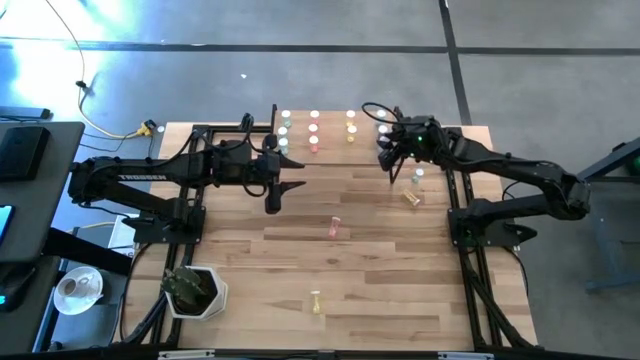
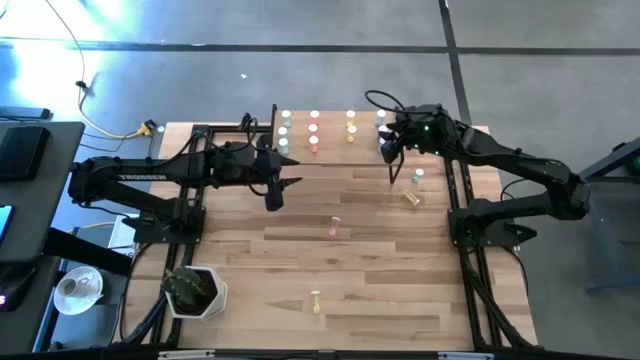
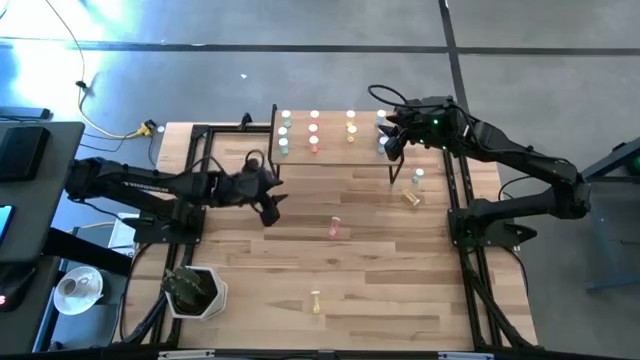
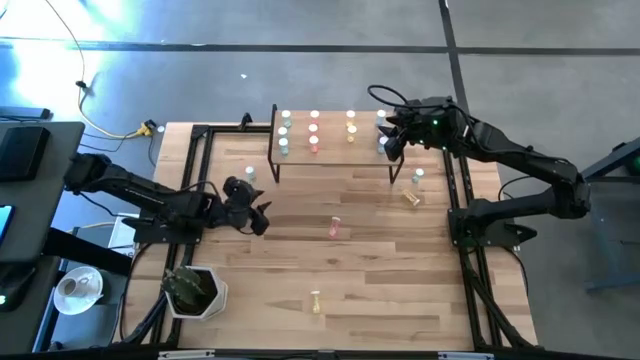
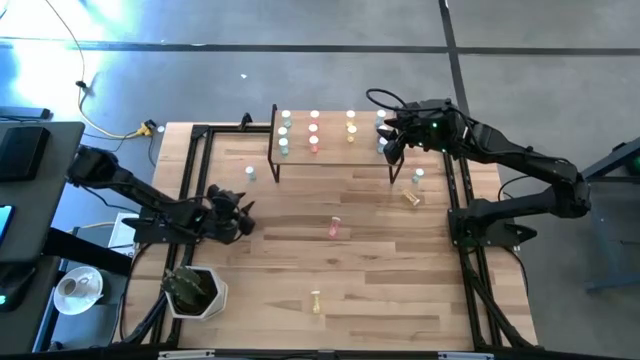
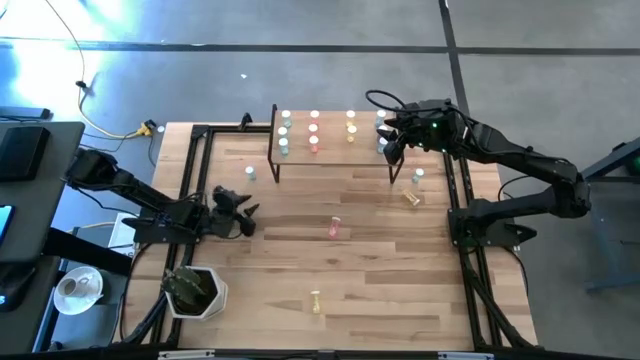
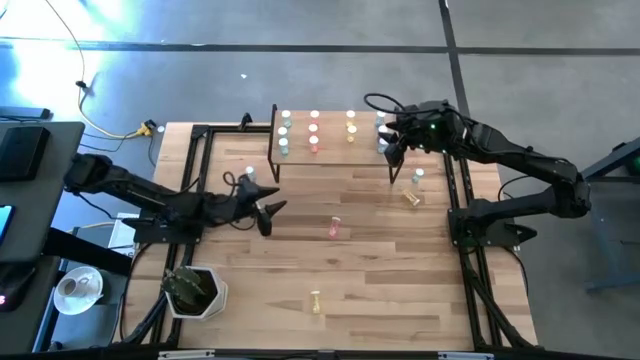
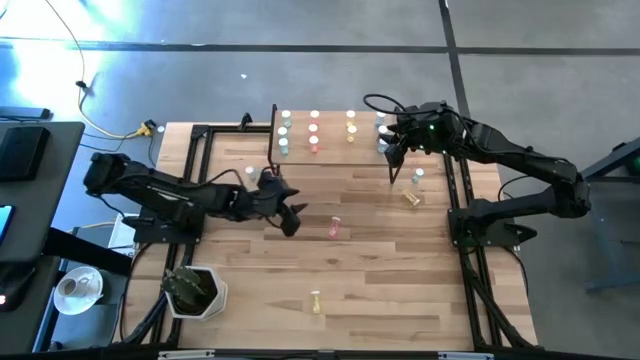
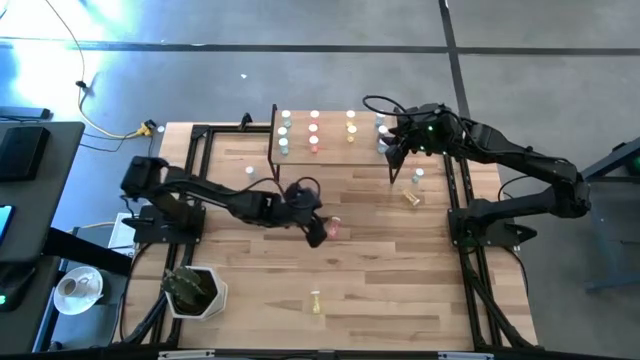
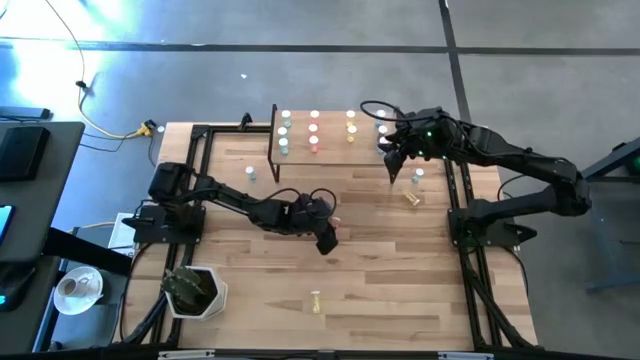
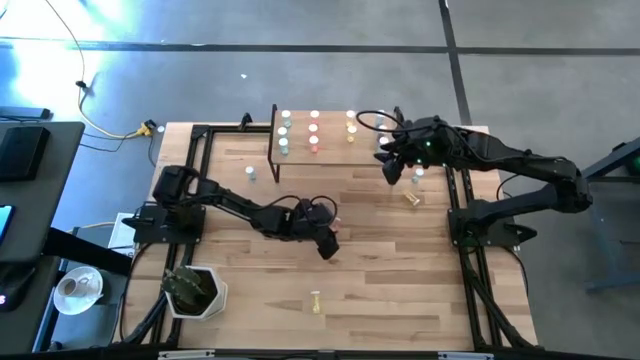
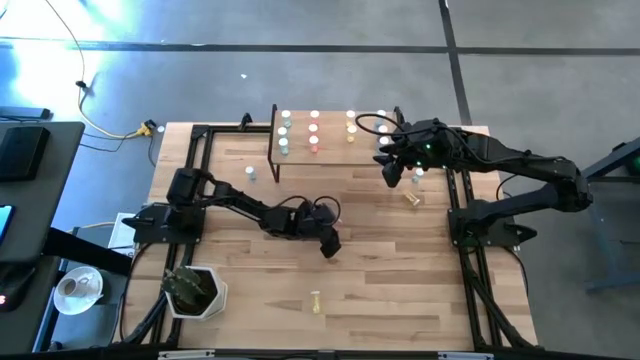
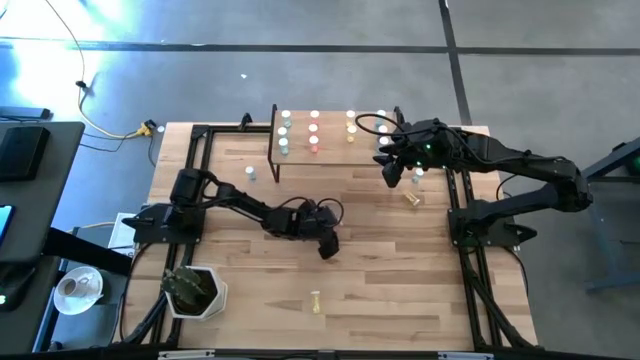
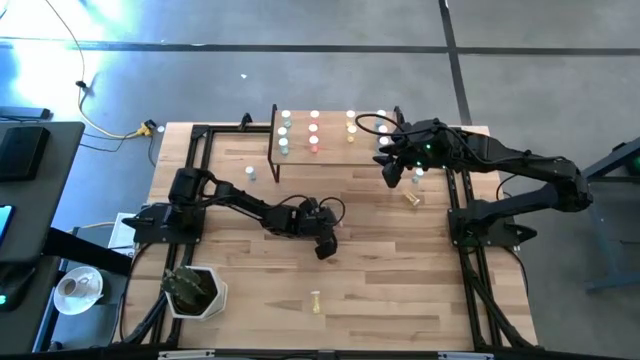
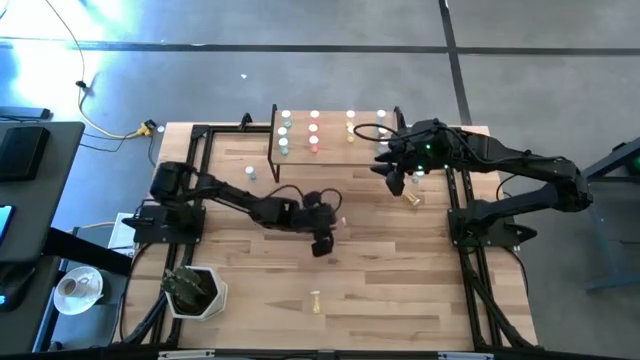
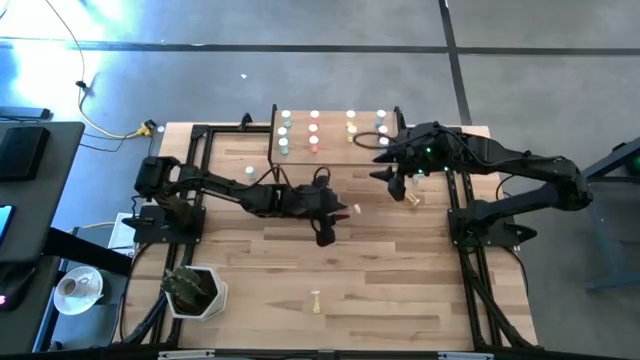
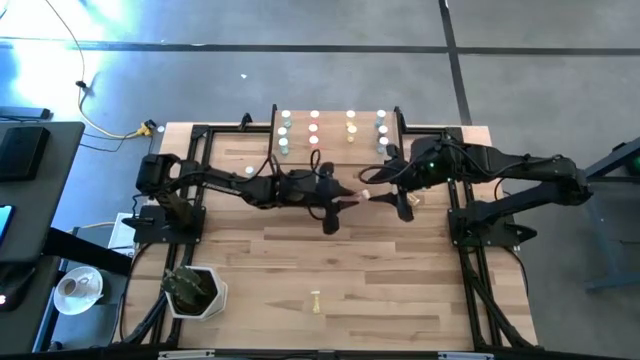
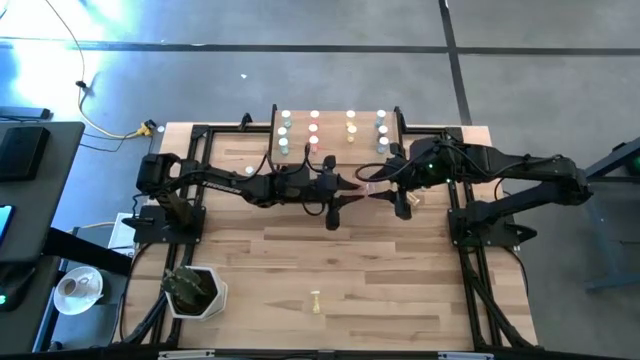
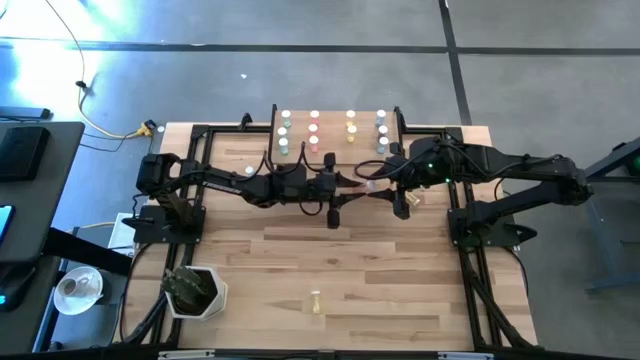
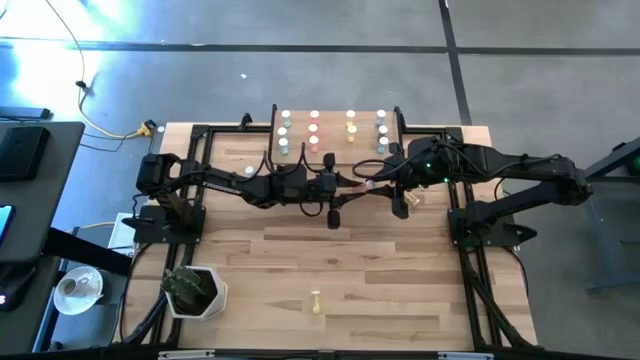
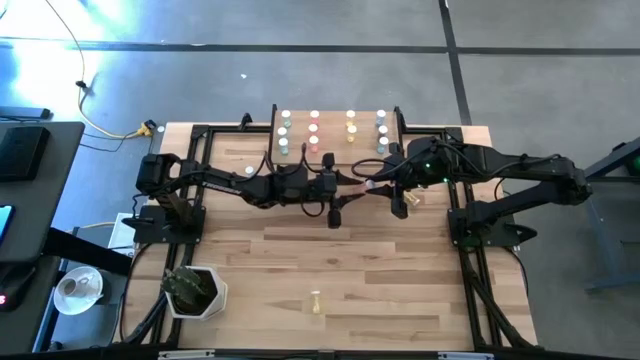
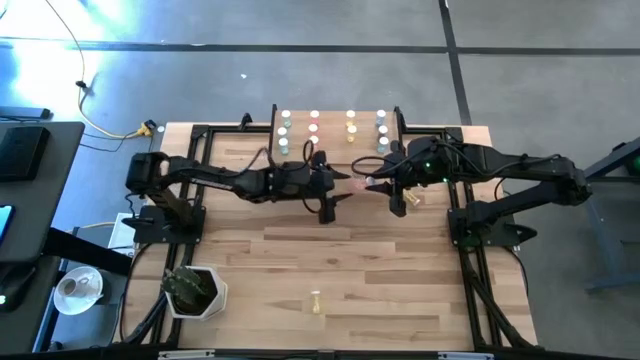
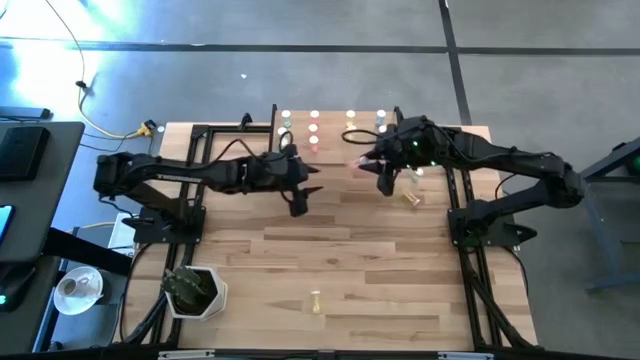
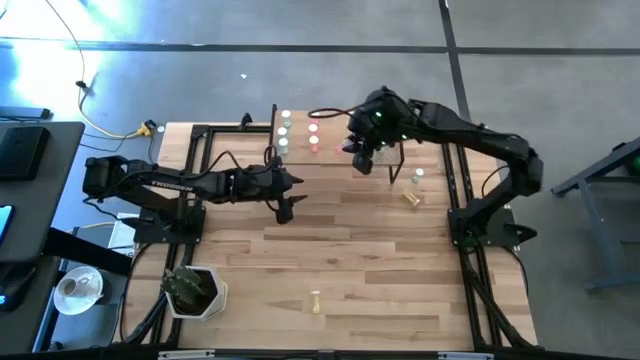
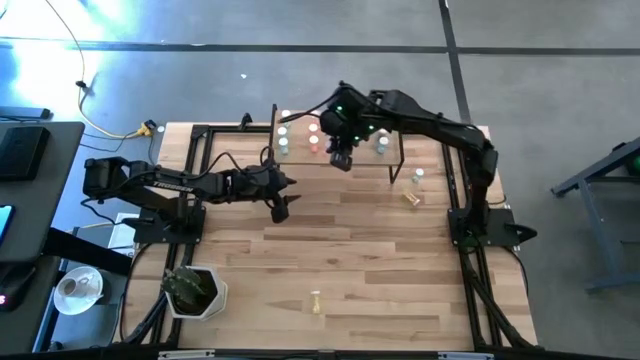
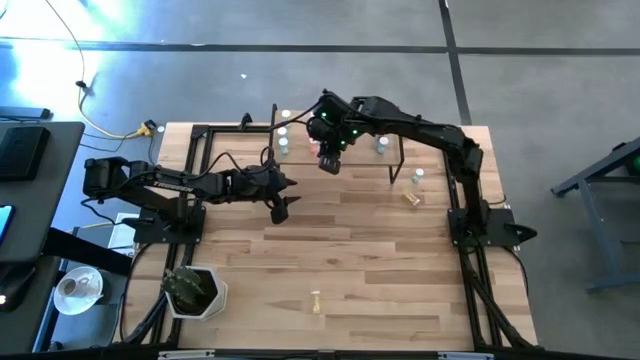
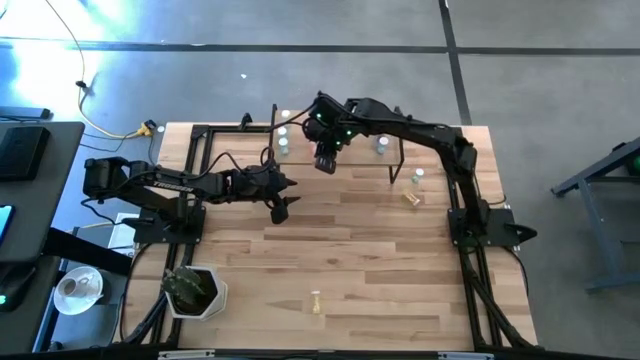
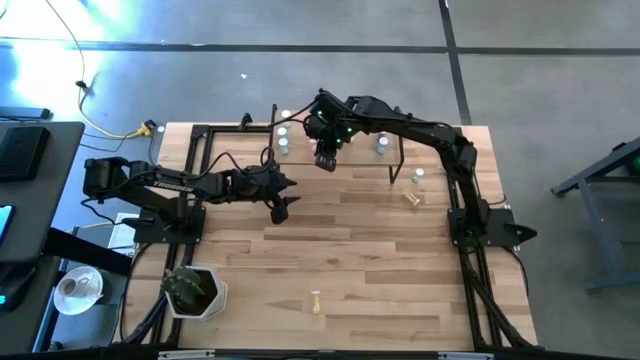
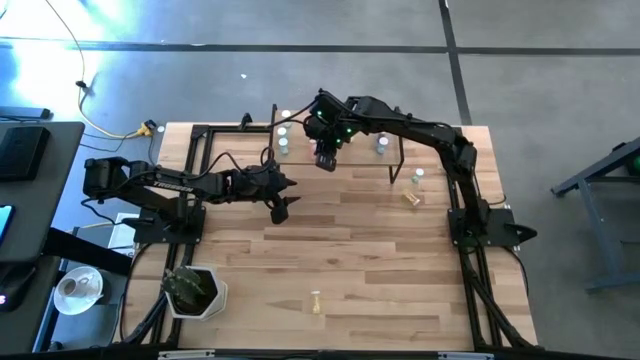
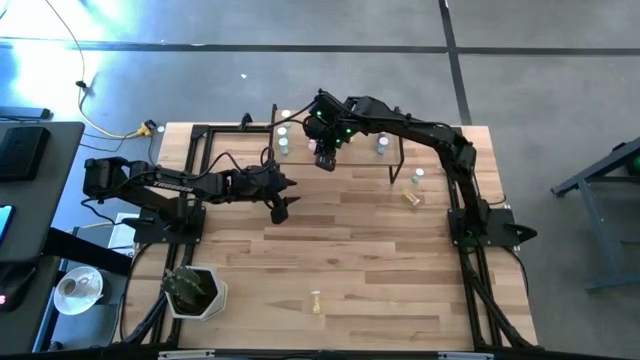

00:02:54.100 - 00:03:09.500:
Task: Pick and place medicine bottles onto shelf by color
Put the pink pill bottle on the shelf

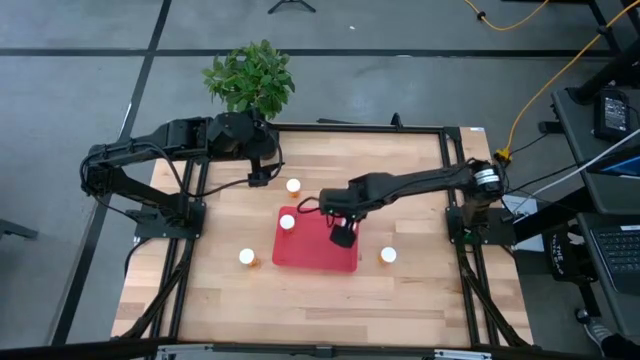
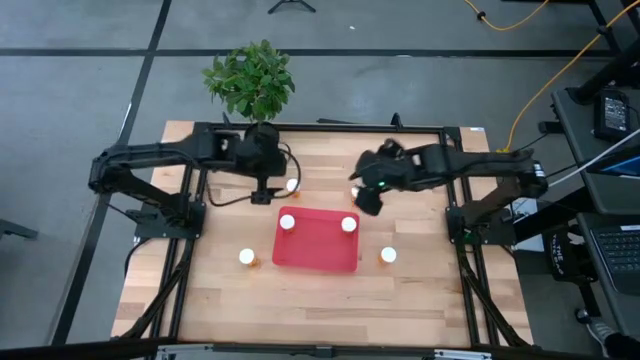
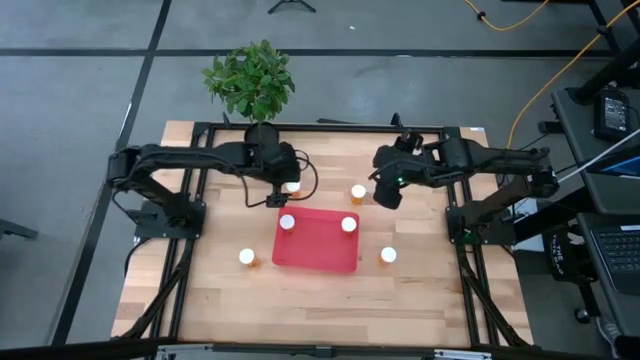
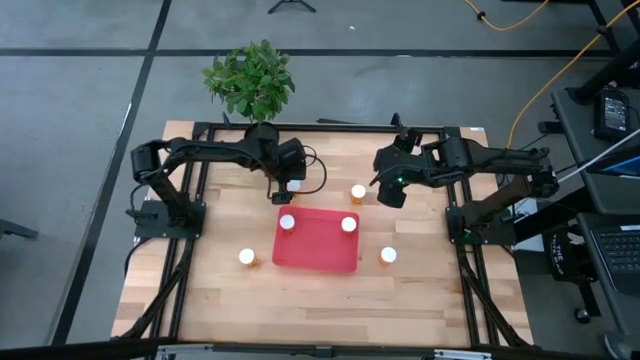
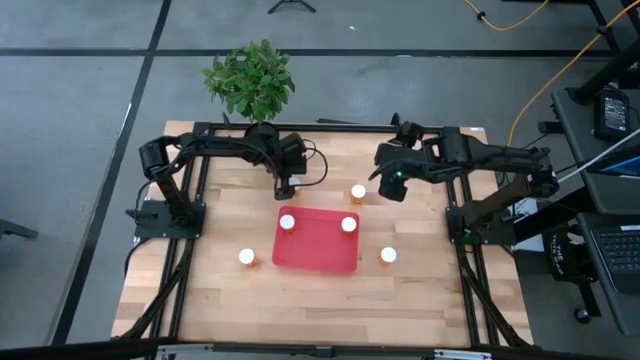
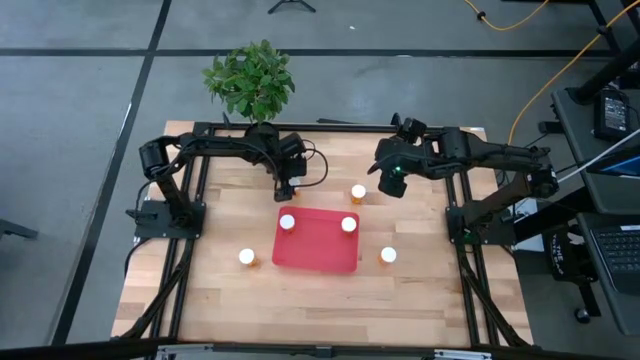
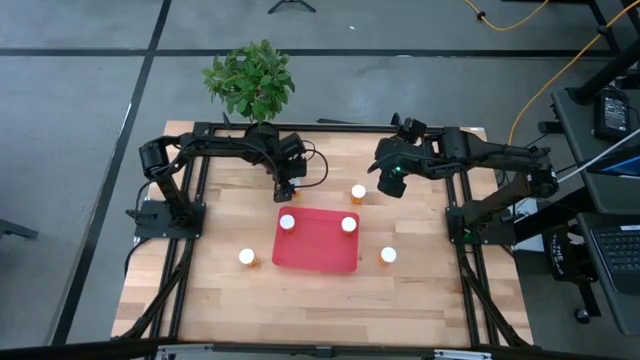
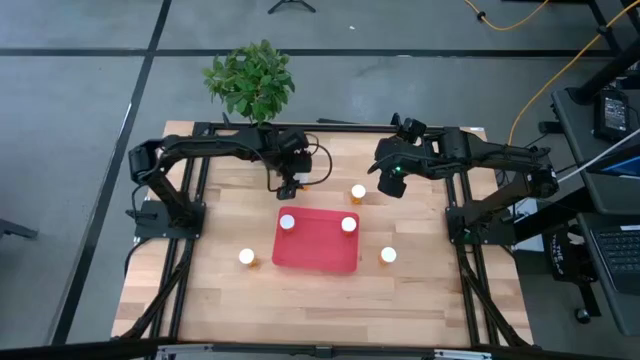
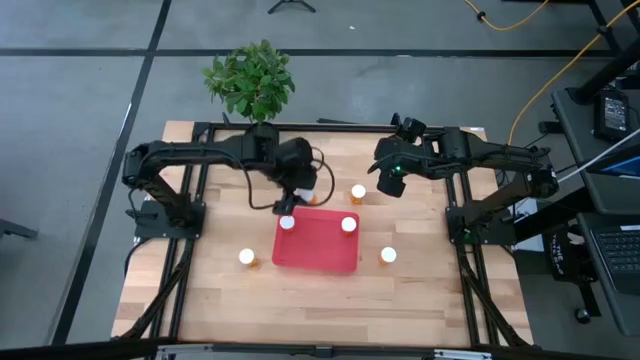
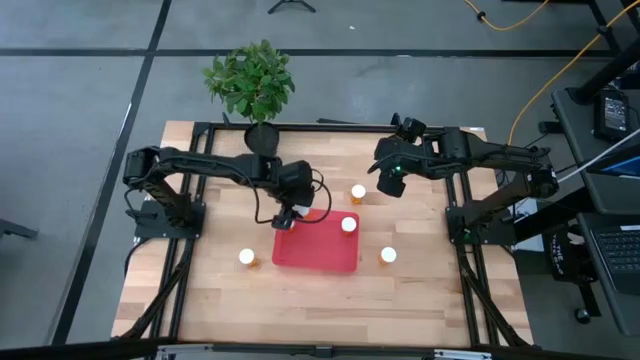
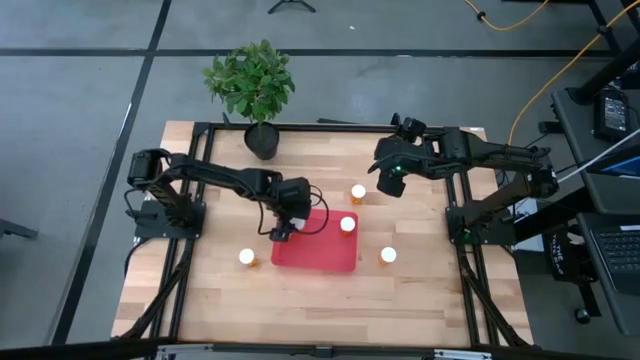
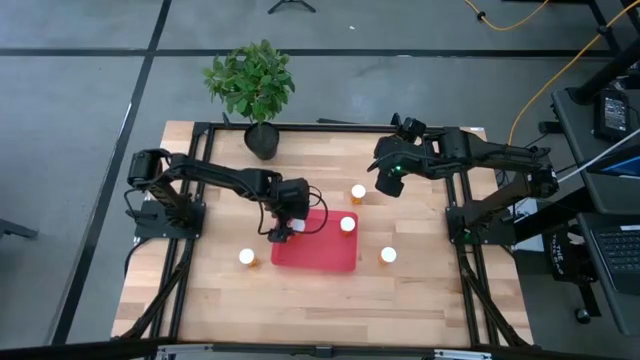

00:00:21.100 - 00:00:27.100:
Task: Pick and place pill bottles into a basket
Put the orange pill bottle into the bin
